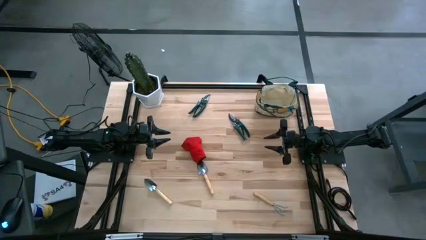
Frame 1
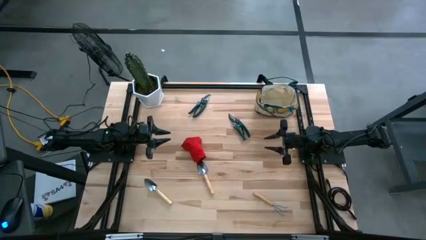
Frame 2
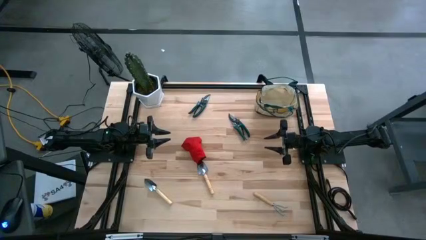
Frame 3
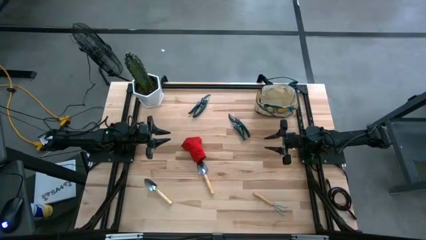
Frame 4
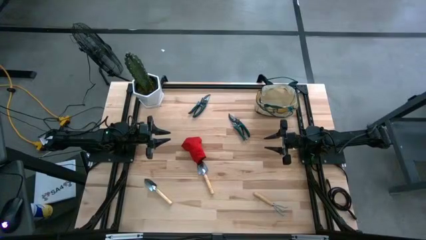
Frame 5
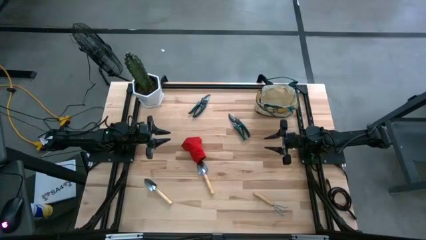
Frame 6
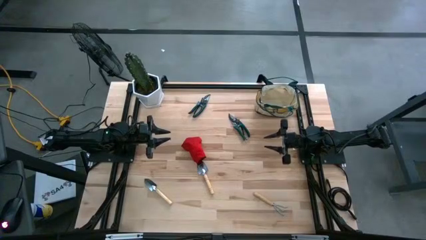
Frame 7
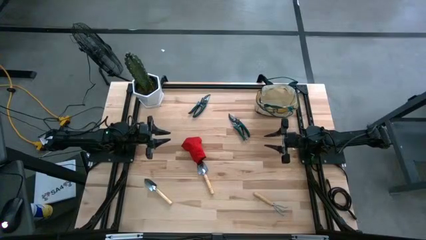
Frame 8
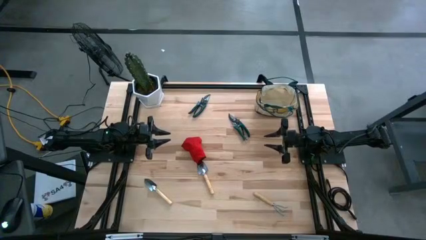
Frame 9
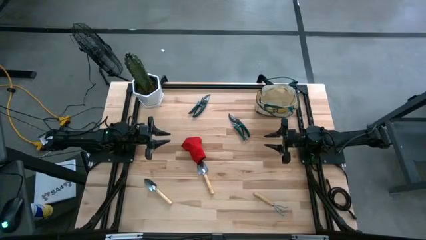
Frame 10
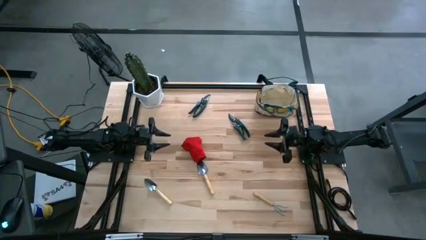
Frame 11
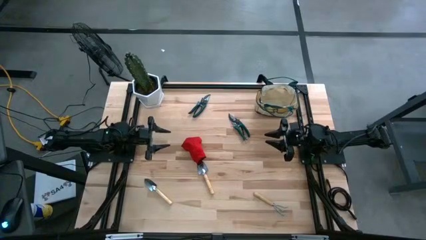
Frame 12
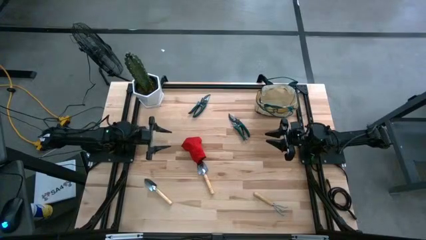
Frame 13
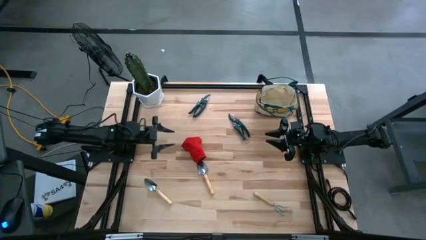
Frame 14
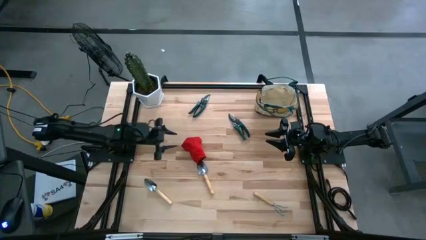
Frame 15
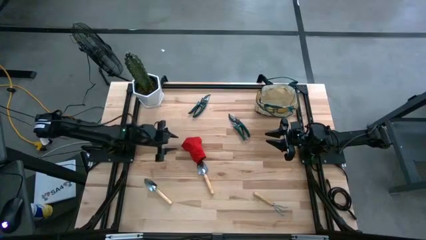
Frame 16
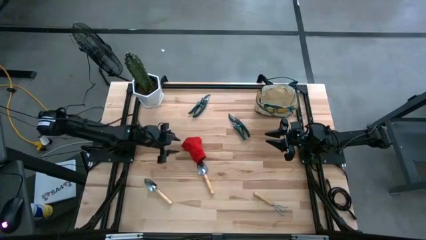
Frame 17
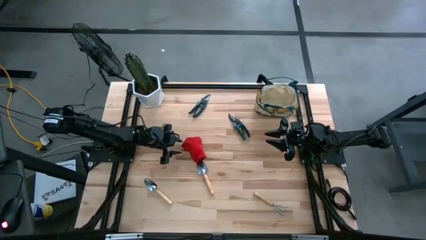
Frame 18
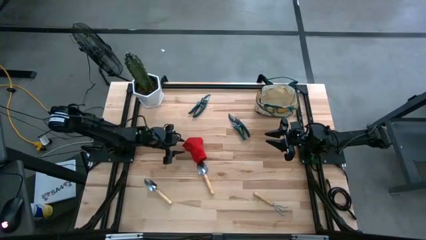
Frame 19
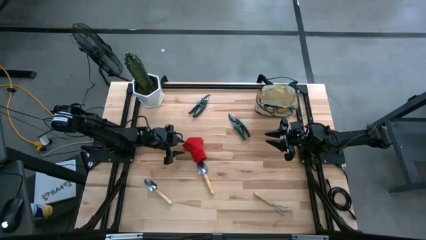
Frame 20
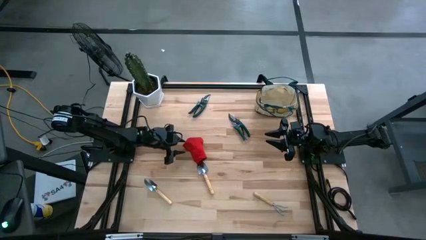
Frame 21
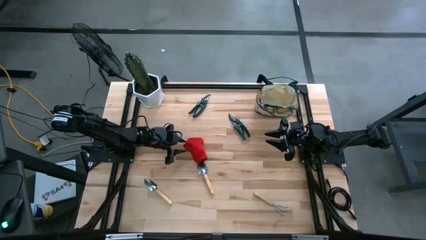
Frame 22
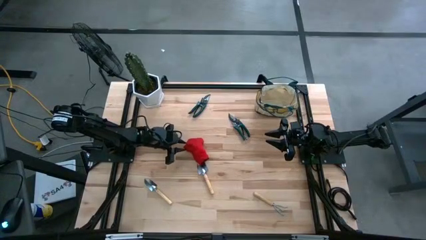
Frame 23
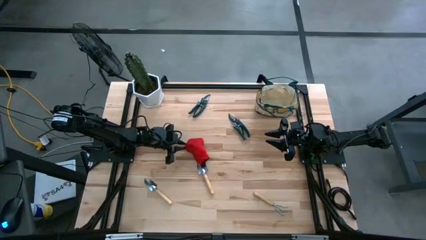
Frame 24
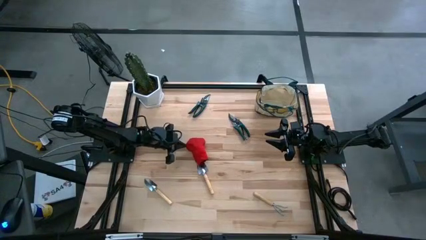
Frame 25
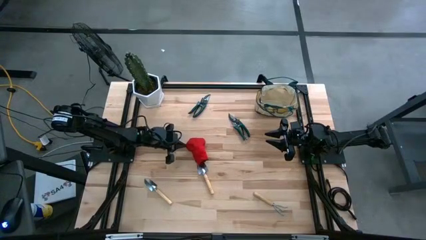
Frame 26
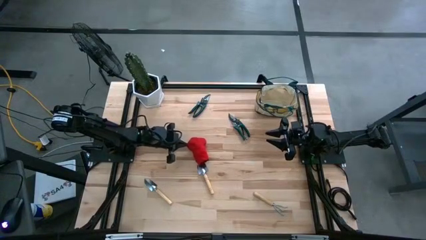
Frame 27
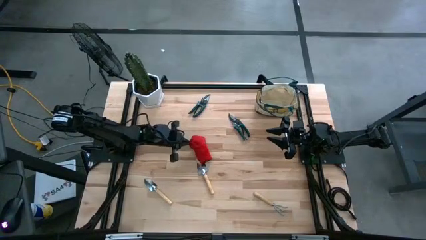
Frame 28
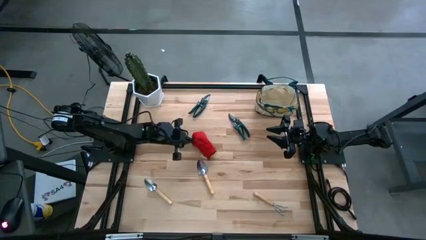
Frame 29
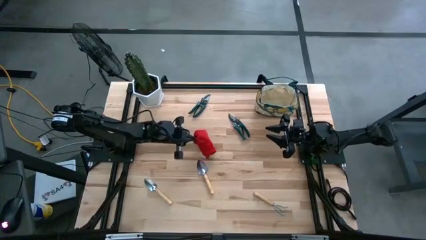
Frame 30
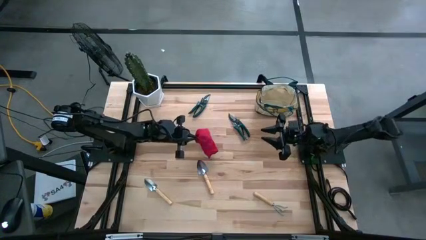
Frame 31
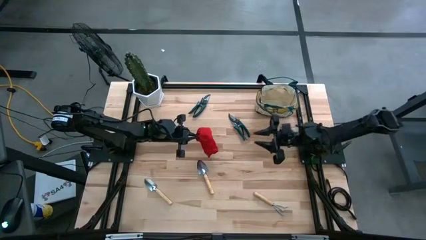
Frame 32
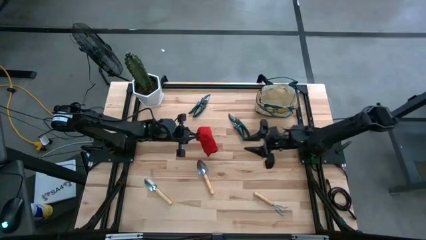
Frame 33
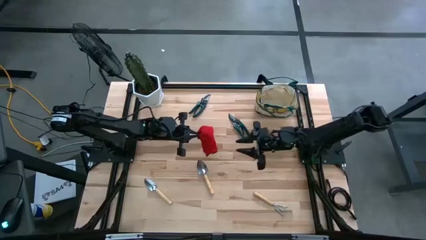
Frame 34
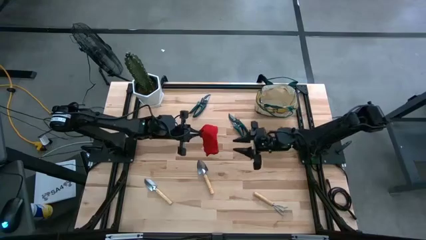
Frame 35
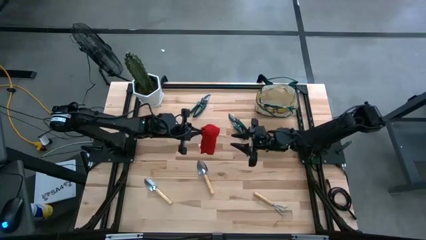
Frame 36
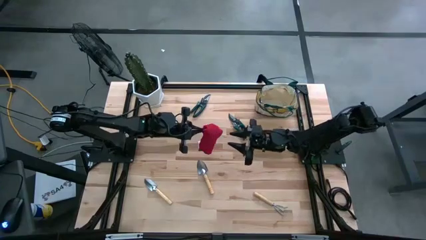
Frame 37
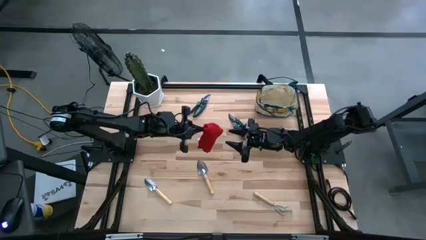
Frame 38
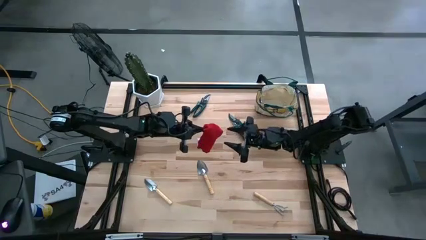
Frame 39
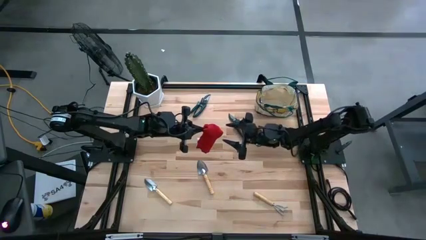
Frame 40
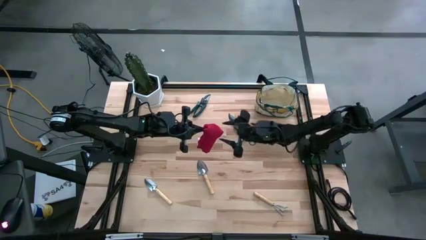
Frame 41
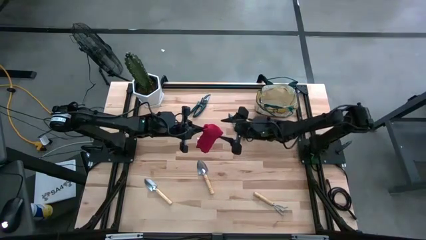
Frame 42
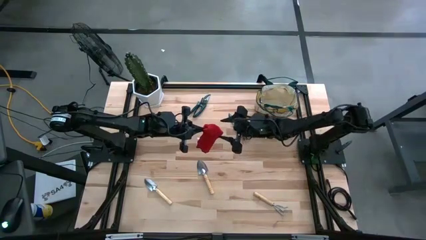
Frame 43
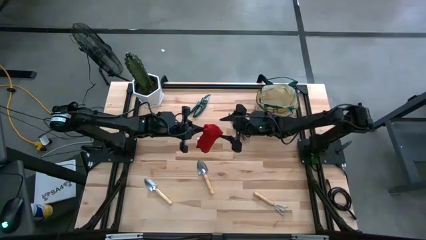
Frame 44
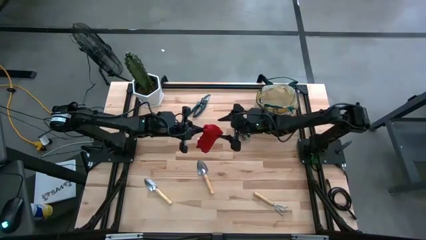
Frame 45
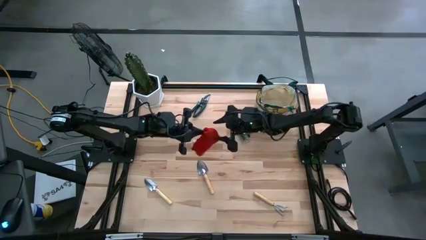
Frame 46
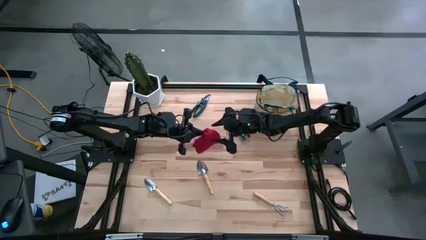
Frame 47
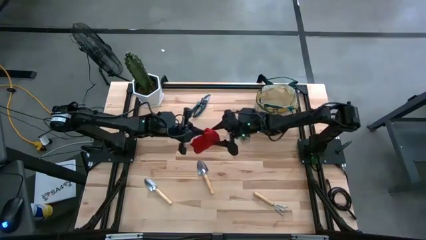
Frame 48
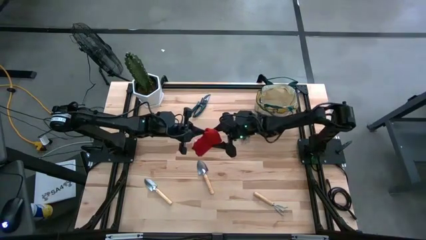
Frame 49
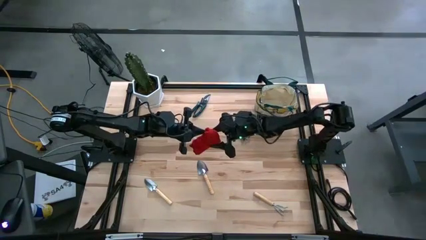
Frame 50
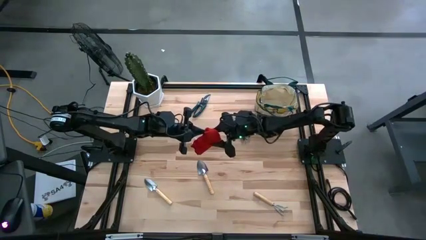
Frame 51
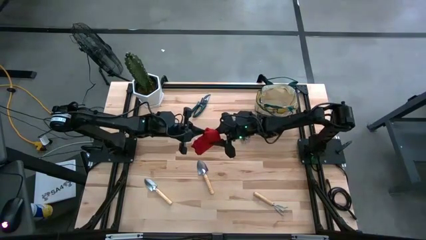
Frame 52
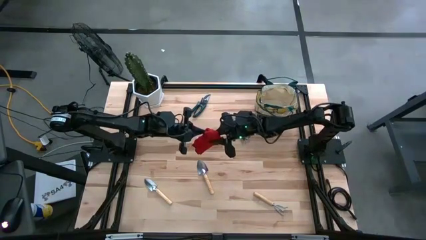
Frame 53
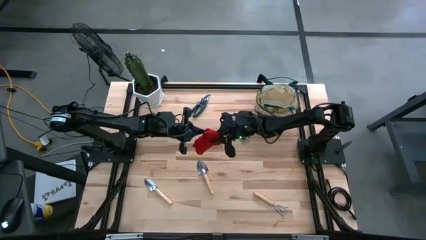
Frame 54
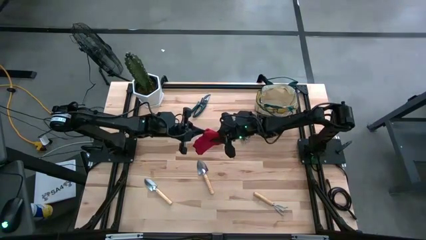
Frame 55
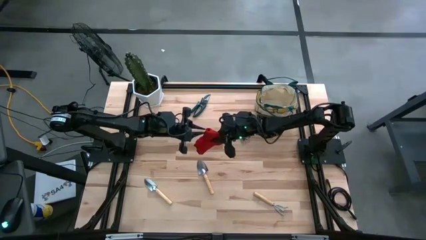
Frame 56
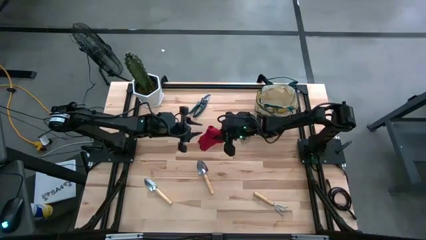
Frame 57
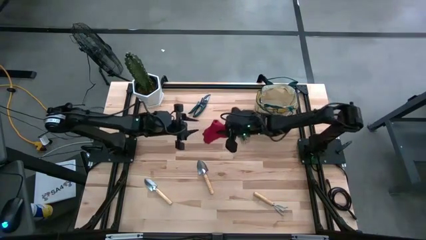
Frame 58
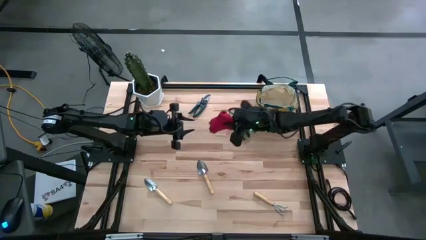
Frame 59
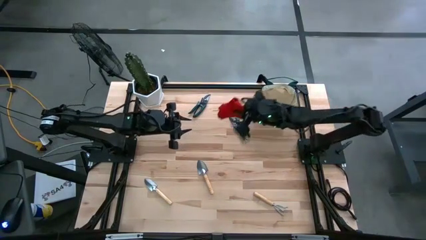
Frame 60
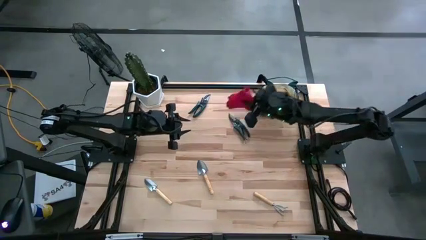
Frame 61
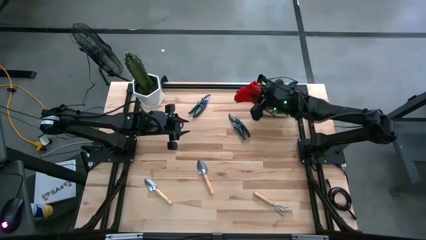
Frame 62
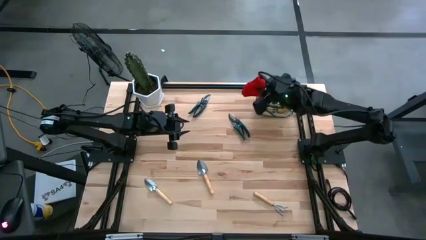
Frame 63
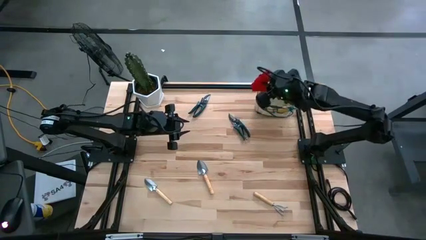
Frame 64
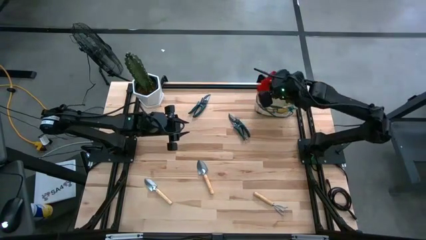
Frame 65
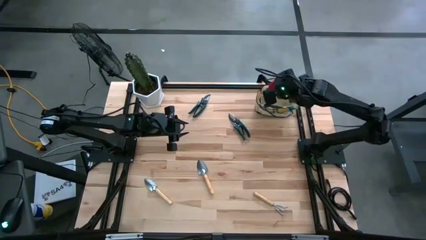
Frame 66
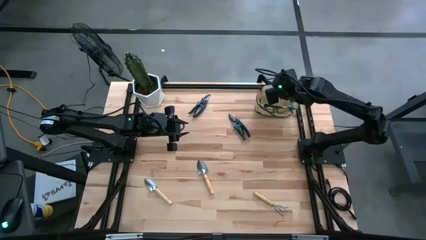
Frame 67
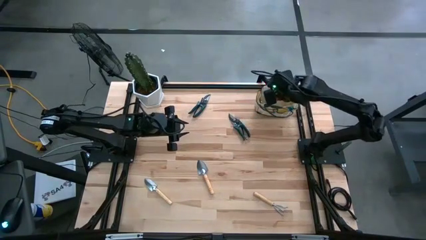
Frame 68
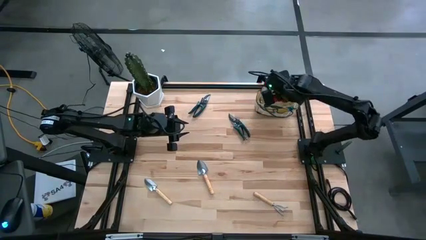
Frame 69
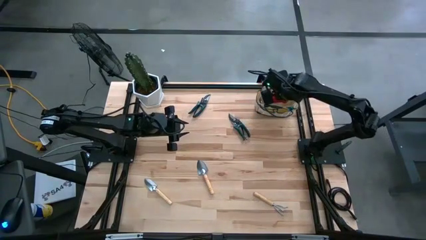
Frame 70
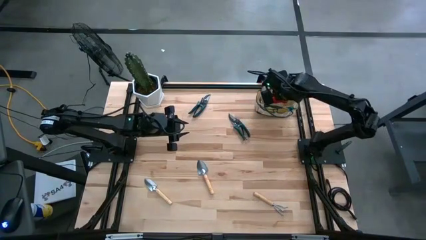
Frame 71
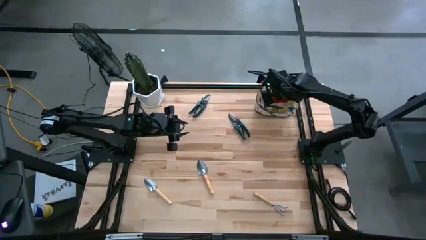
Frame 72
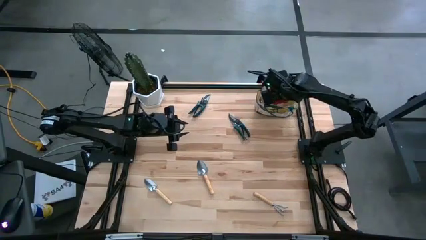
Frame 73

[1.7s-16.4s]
Task: Pick & Place Garden tools in Gardening bag
Put the red gloves into the gardening bag
